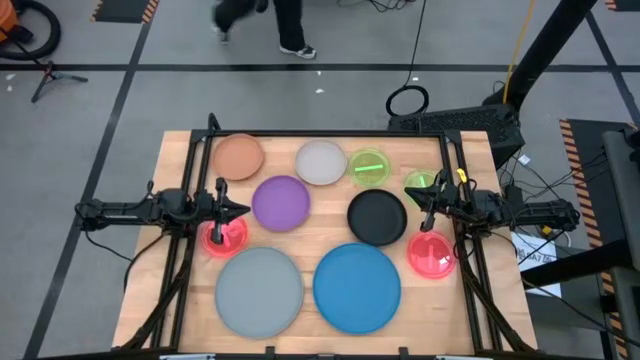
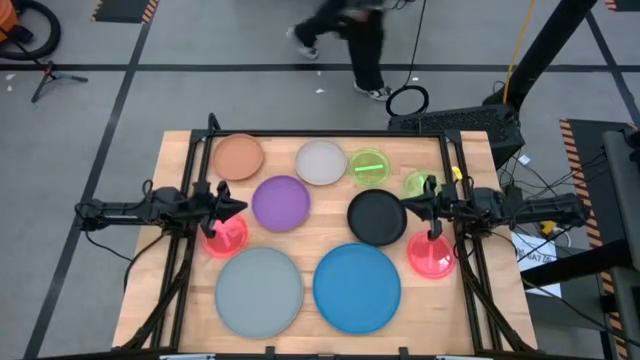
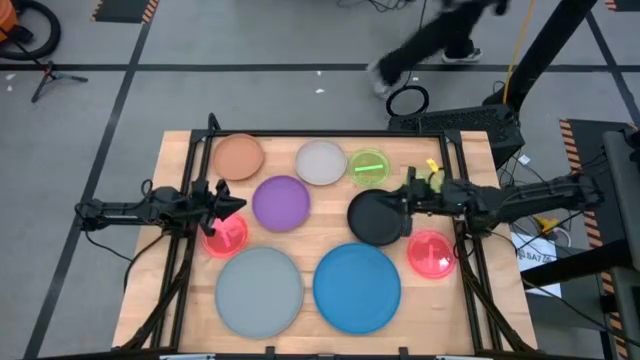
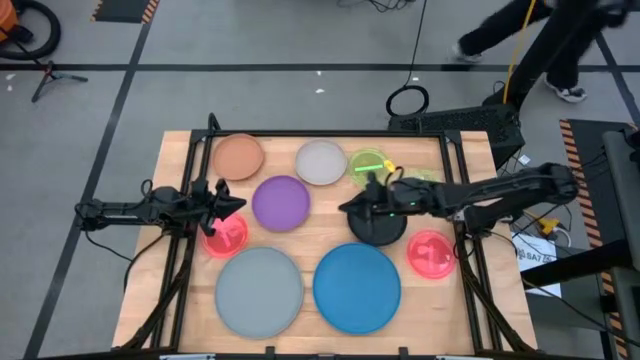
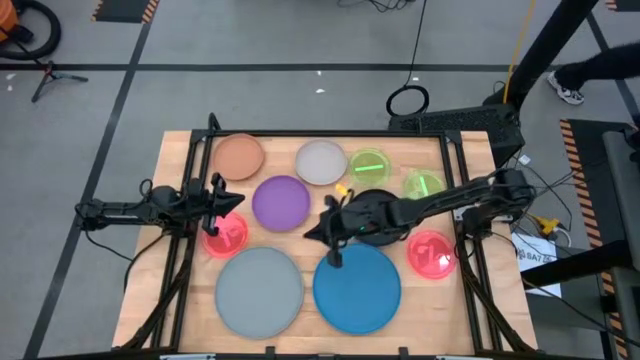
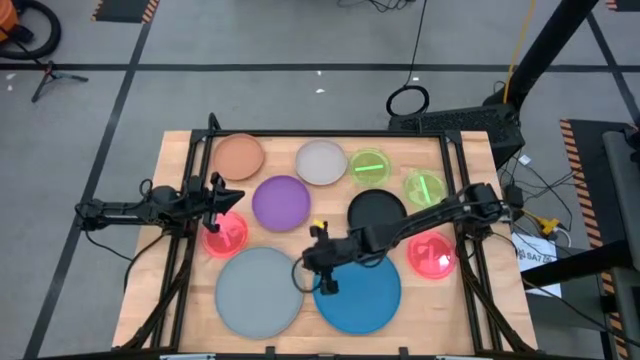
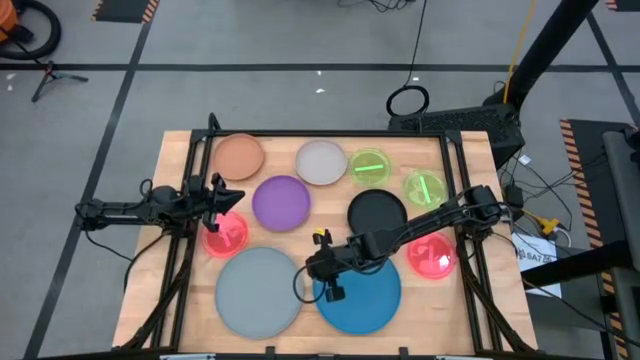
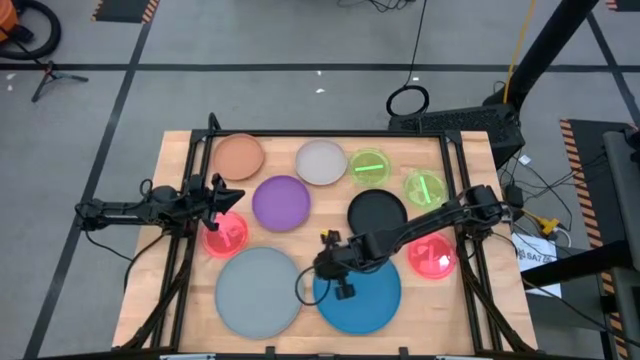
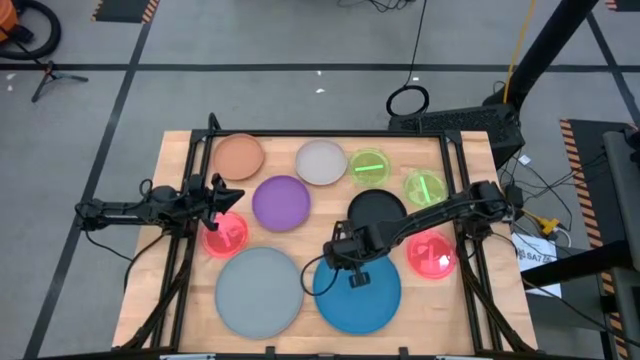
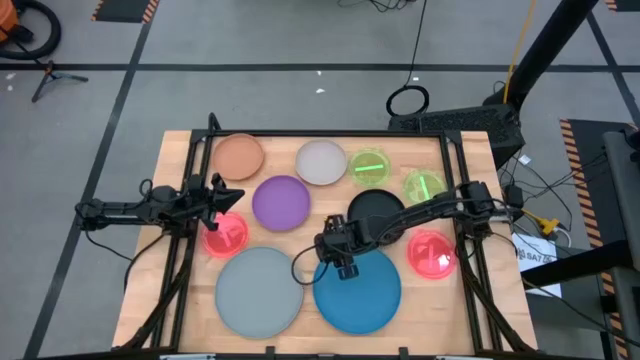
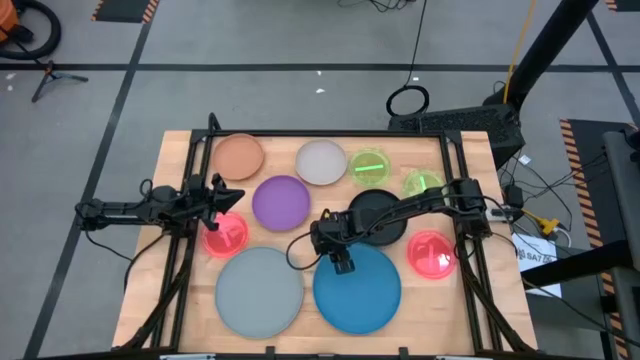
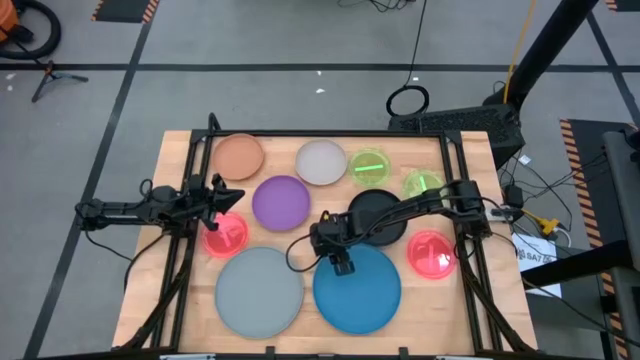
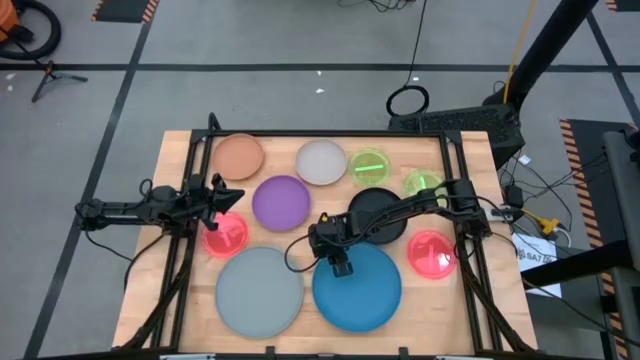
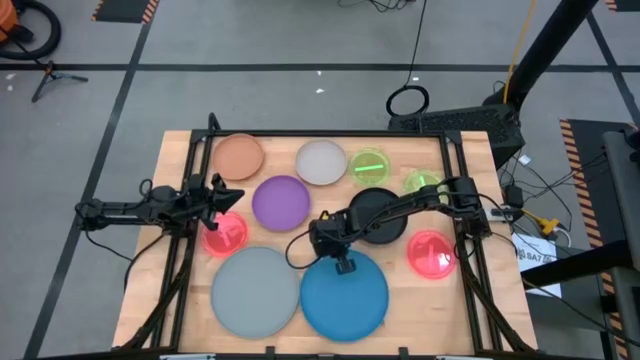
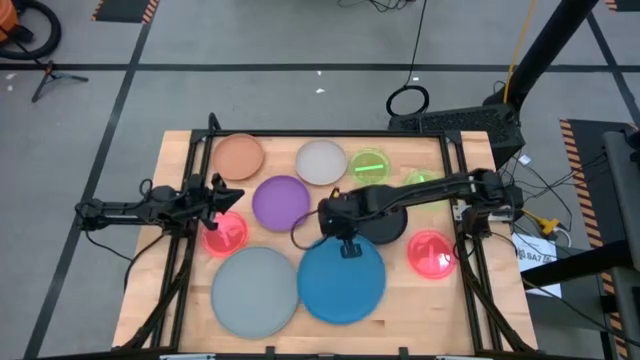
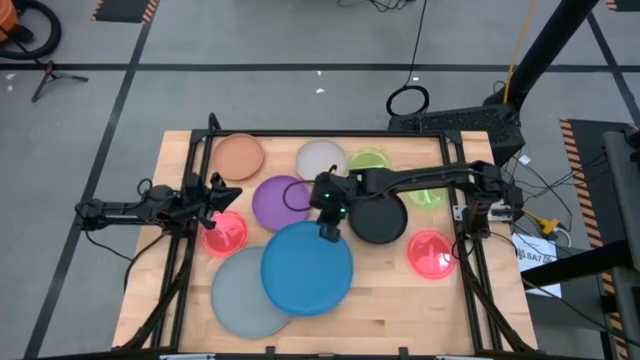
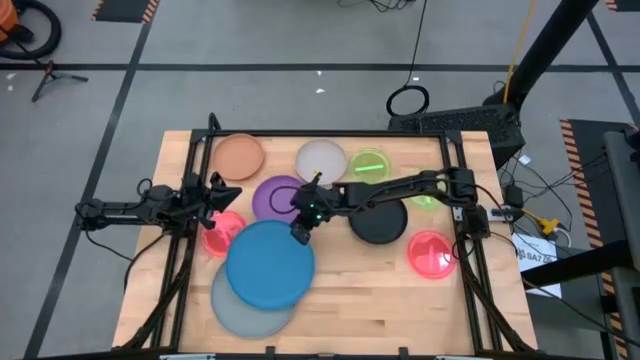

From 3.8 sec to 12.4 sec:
Task: Stack plastic plates
Stack the blue plate on the bottom gray plate

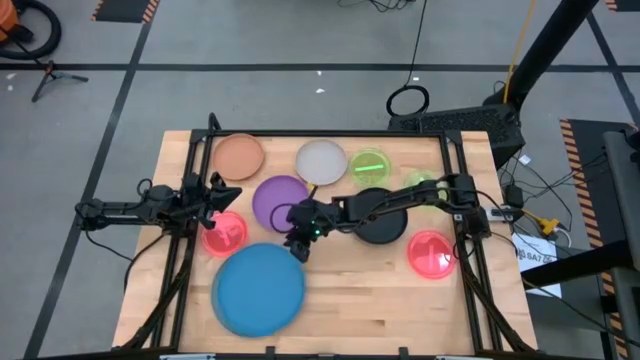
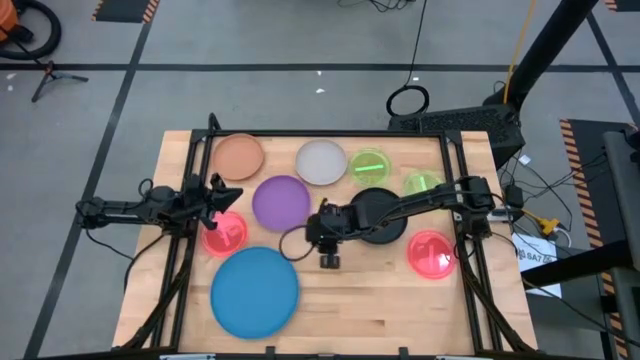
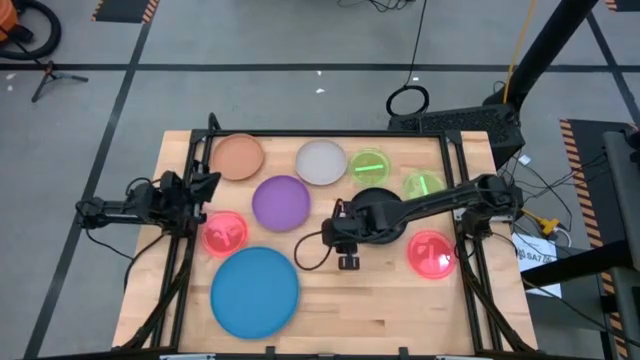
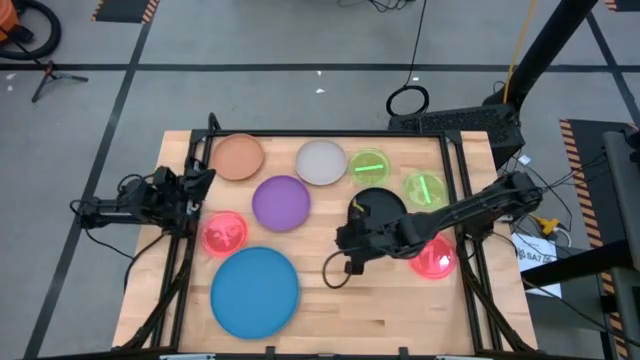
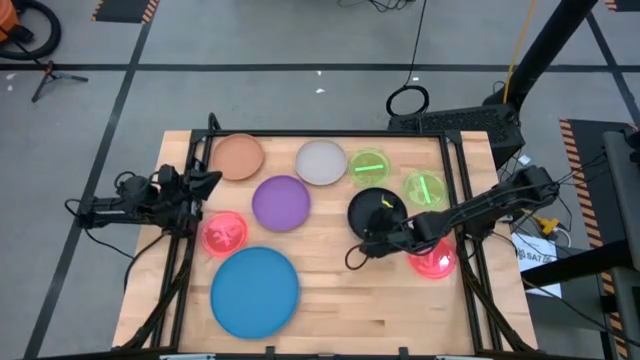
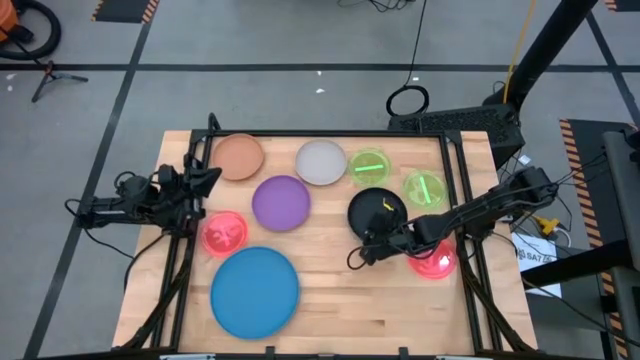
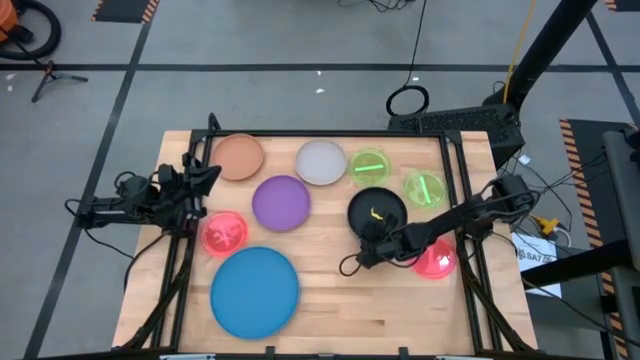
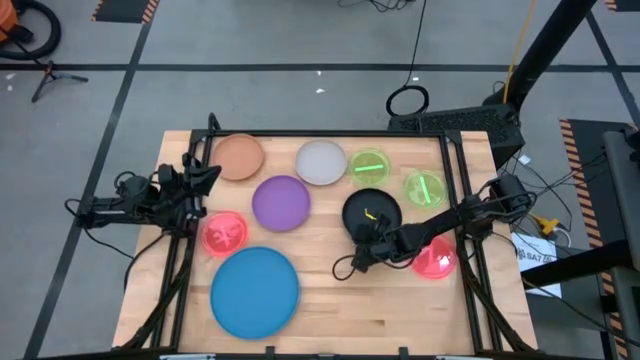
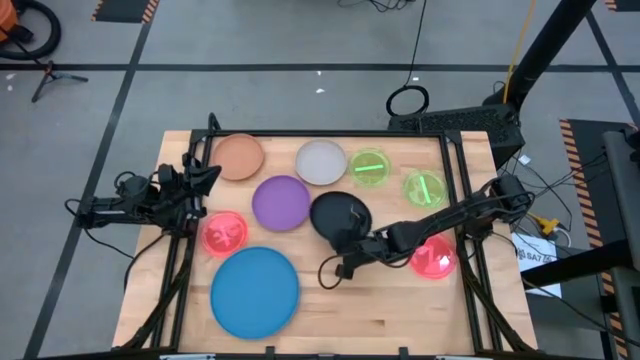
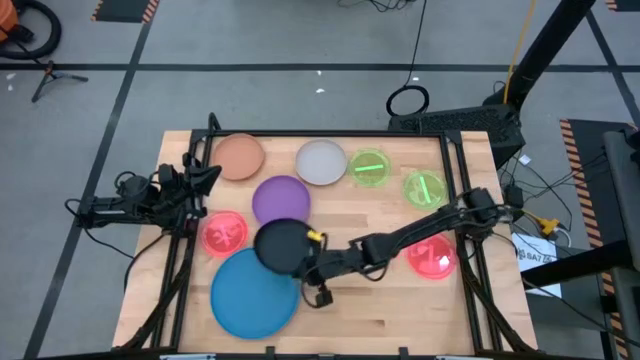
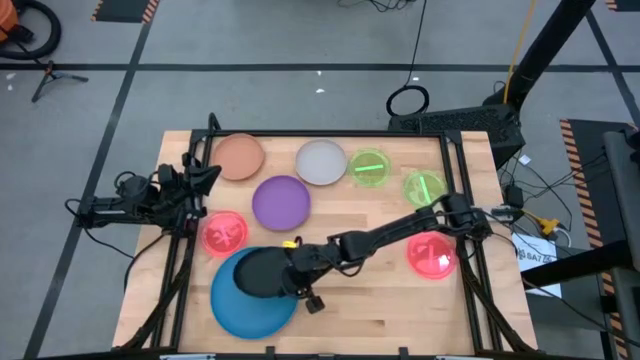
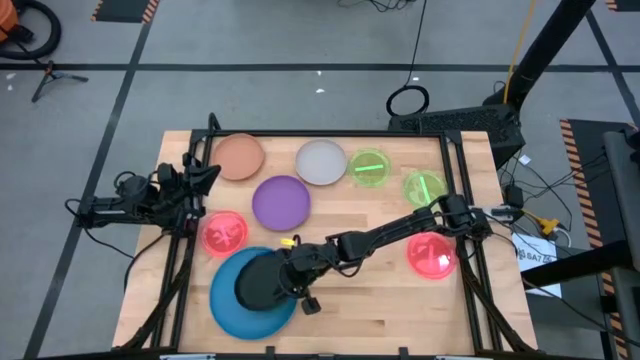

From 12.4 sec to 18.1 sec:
Stack the black plate on the blue plate

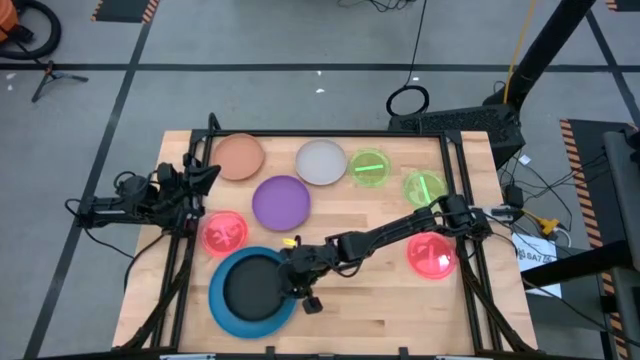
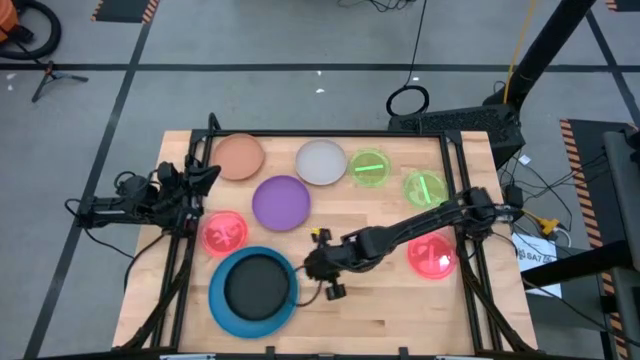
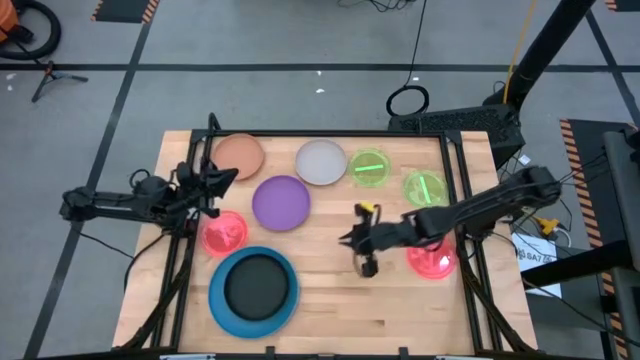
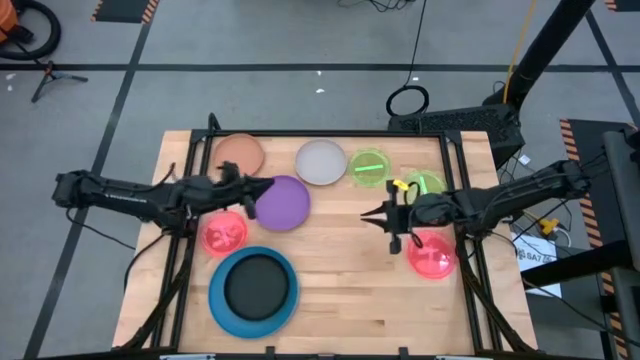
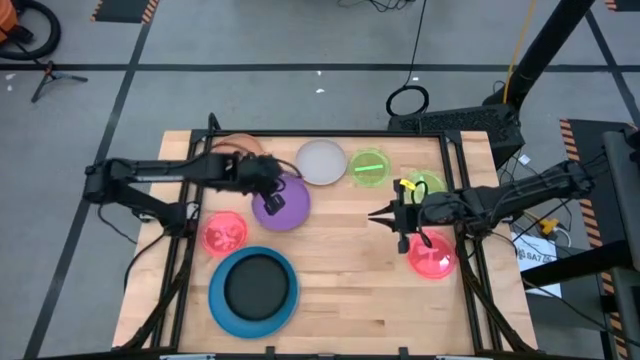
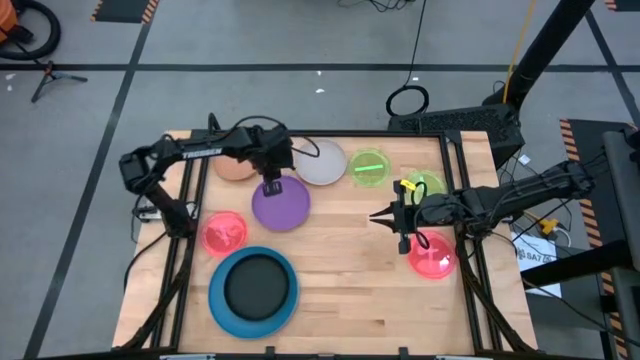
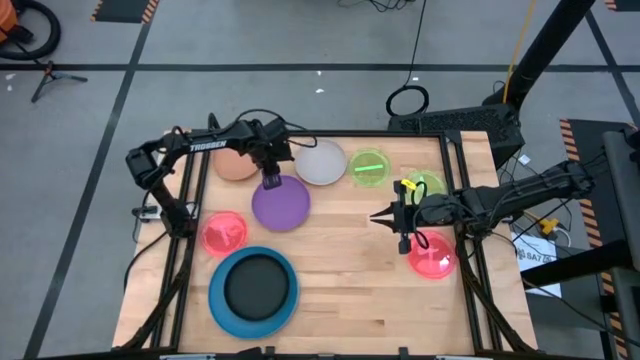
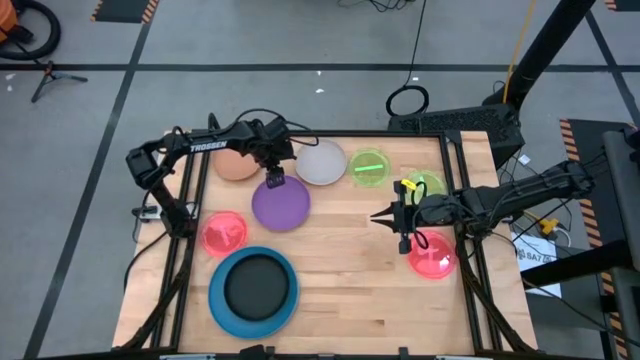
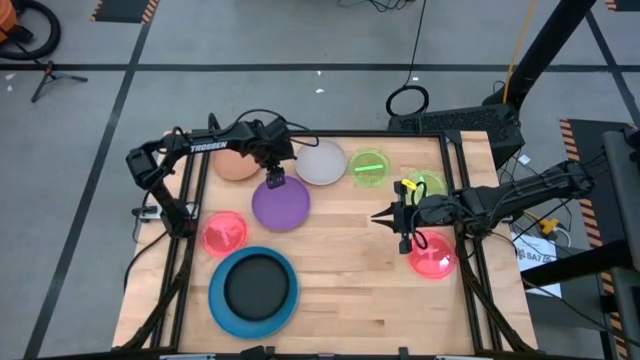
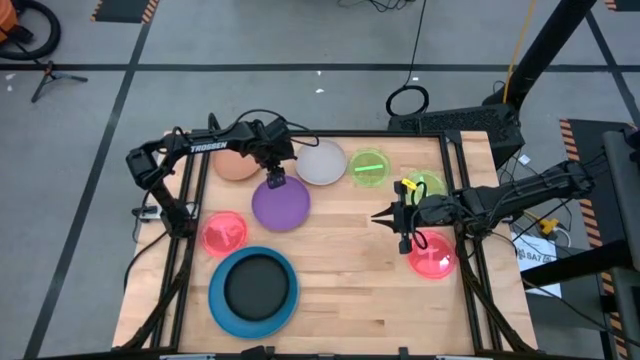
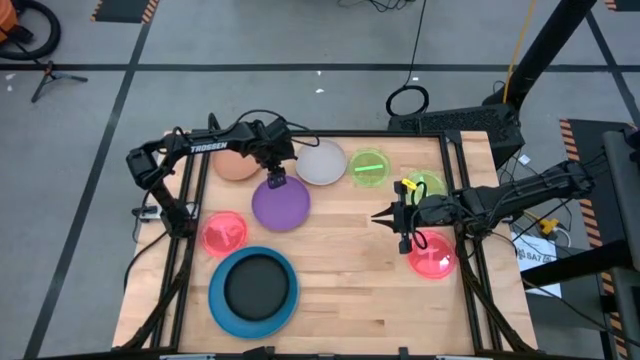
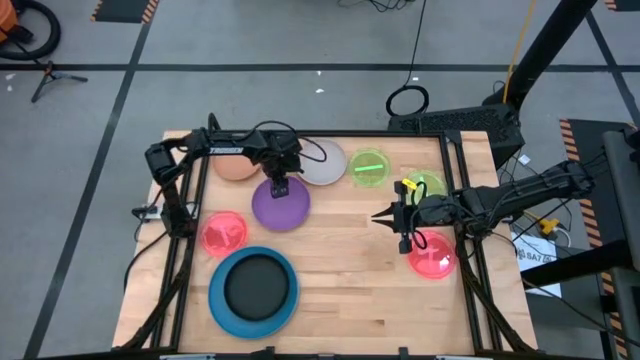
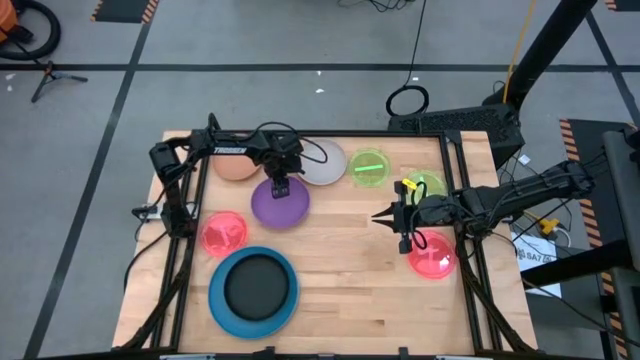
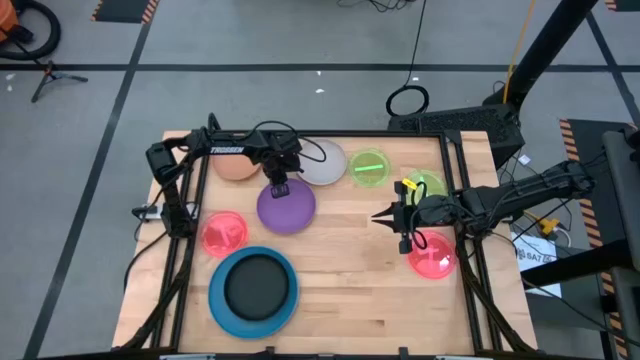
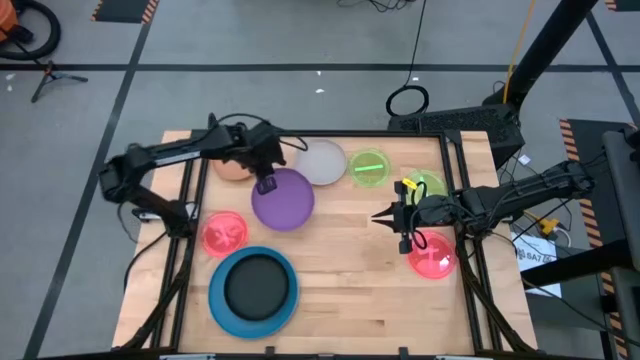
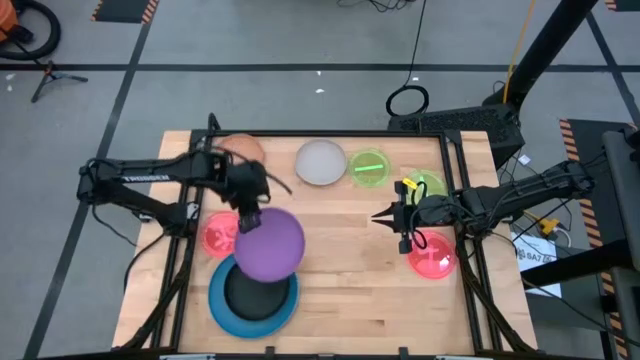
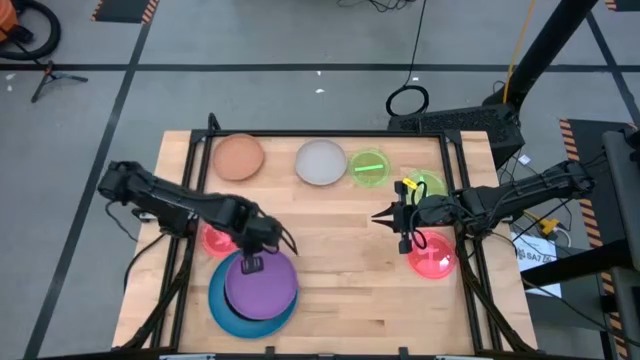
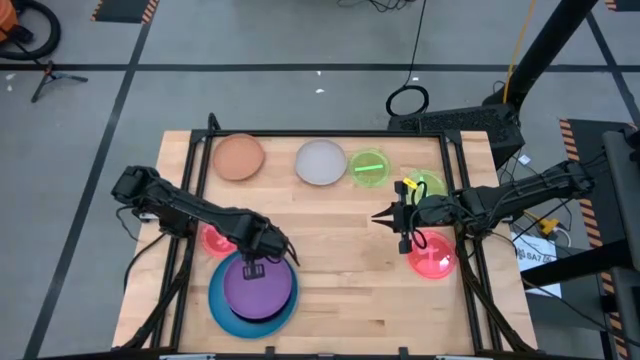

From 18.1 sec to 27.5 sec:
Stack the purple plate on the black plate
